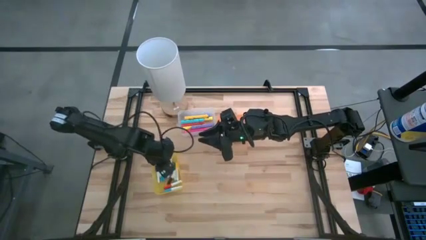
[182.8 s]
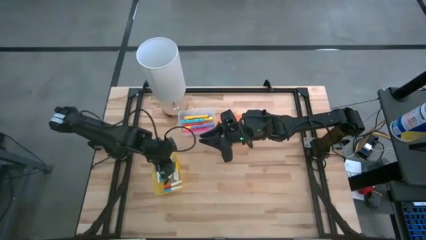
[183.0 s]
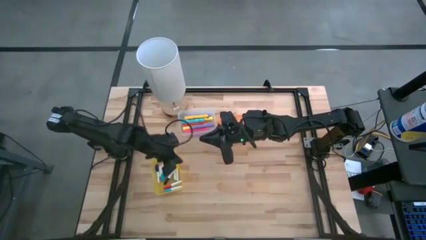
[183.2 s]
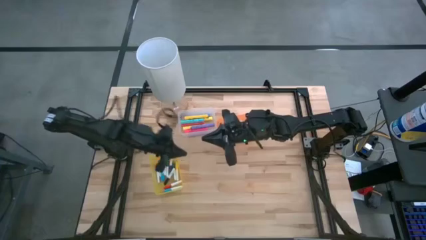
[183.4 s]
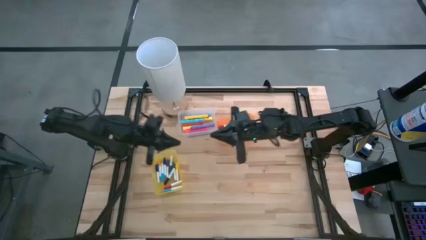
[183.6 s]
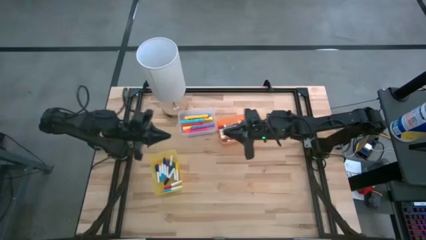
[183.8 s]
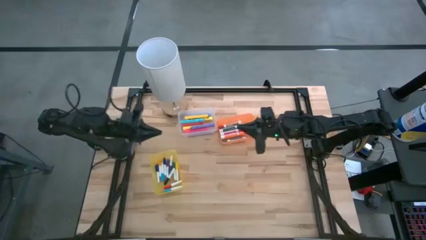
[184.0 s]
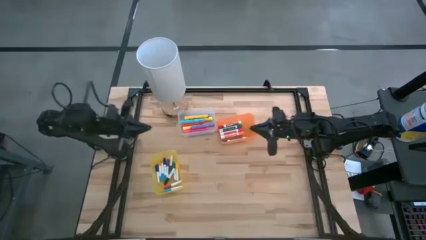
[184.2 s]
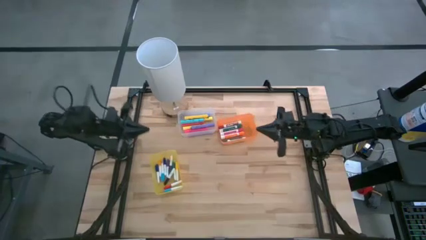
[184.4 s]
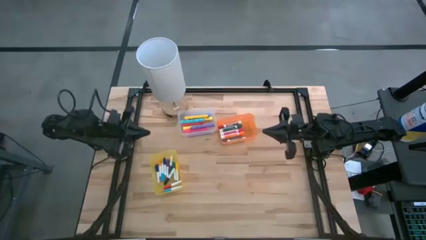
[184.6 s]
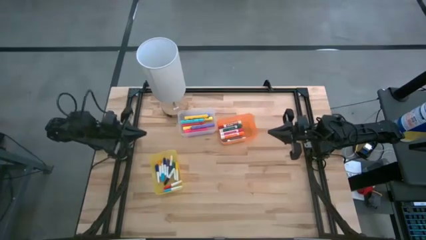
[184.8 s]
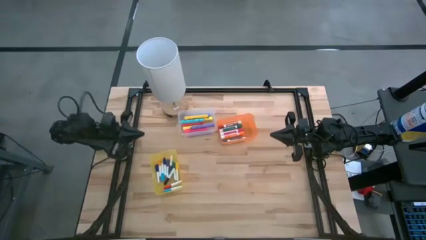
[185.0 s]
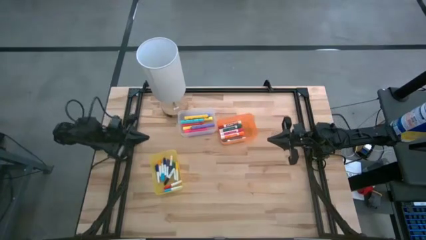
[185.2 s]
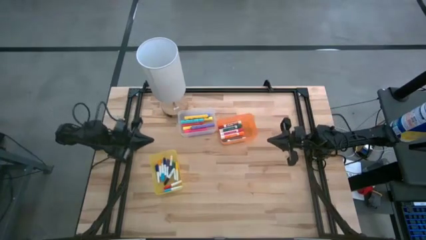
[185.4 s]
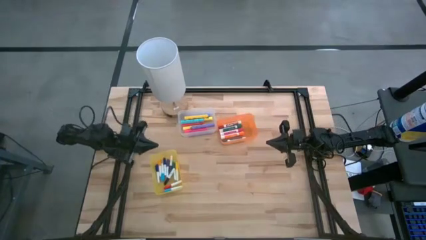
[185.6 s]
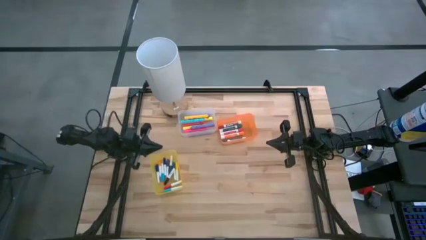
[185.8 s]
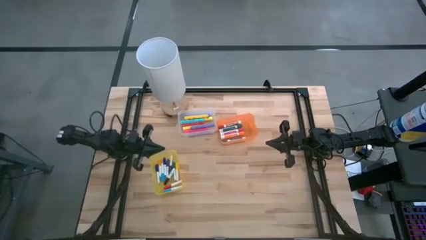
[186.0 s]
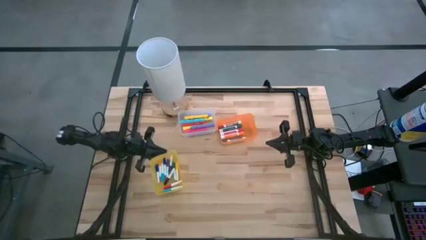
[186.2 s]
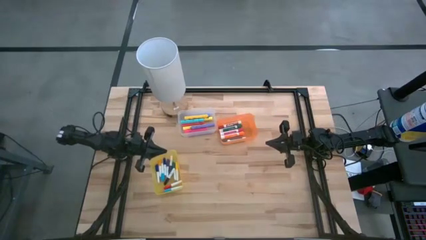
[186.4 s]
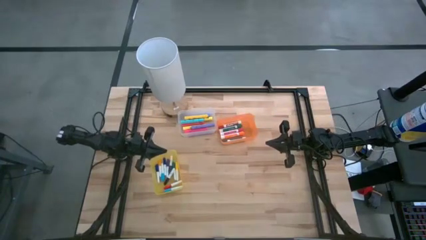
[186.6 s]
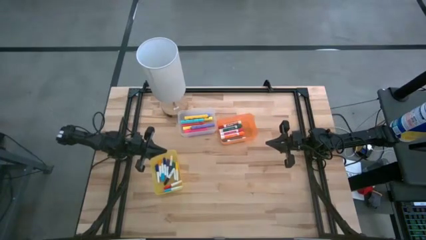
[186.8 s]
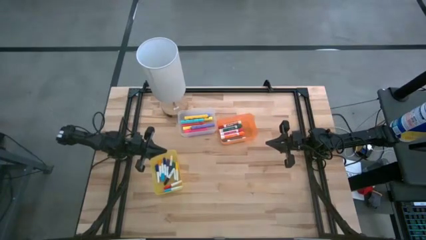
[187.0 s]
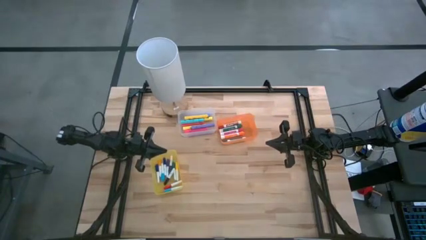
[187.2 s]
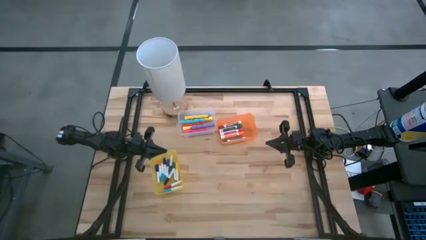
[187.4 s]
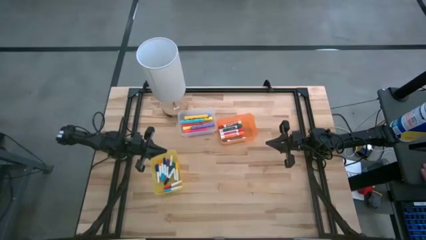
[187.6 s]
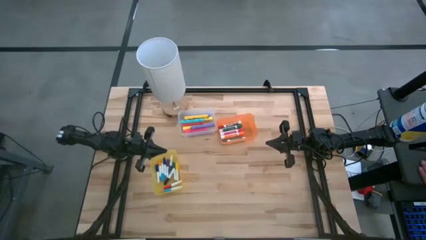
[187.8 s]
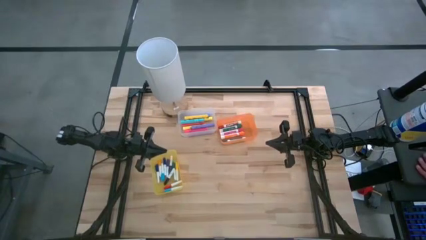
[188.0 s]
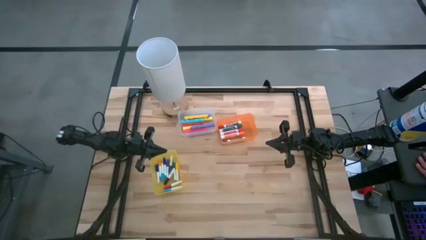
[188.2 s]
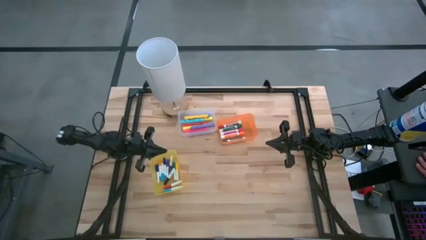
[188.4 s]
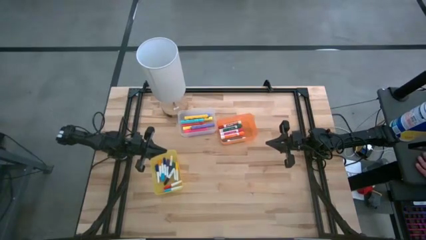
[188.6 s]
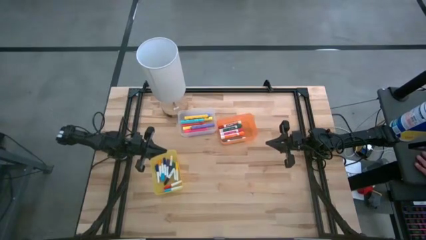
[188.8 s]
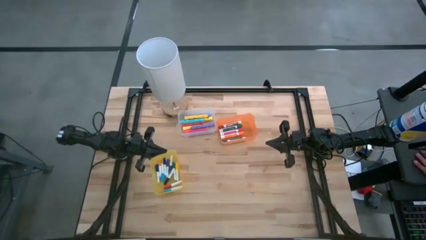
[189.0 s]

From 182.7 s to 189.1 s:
Task: Pick & Place Markers
Return to Home Position

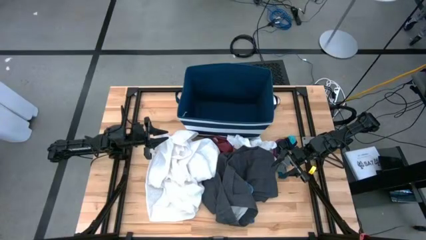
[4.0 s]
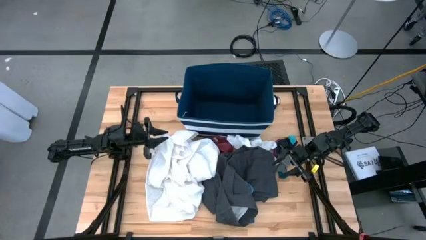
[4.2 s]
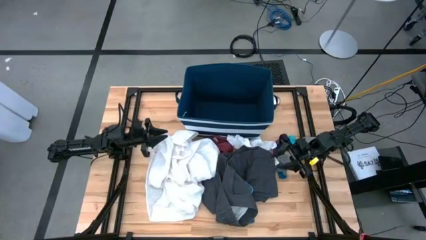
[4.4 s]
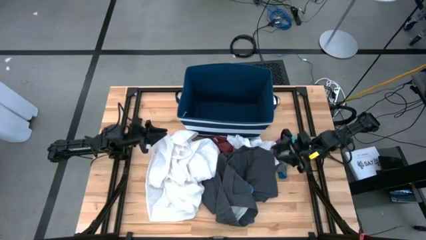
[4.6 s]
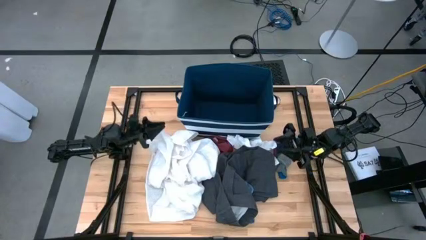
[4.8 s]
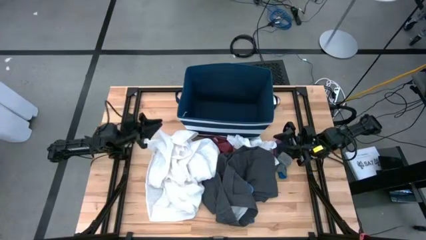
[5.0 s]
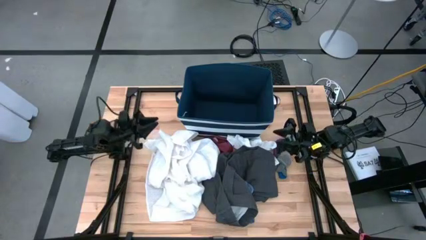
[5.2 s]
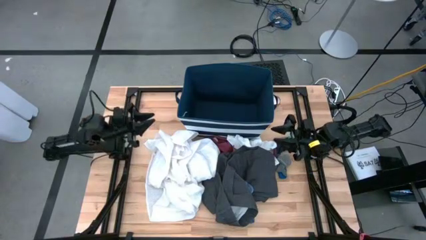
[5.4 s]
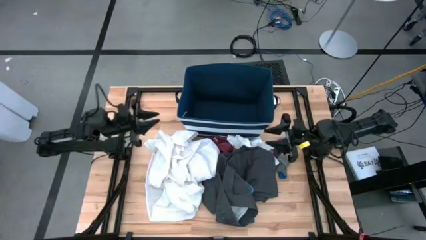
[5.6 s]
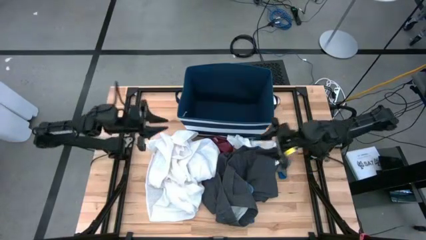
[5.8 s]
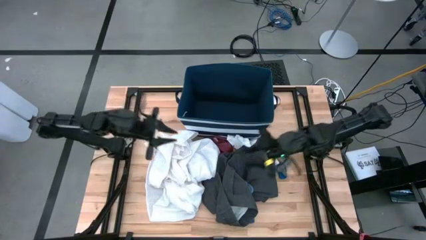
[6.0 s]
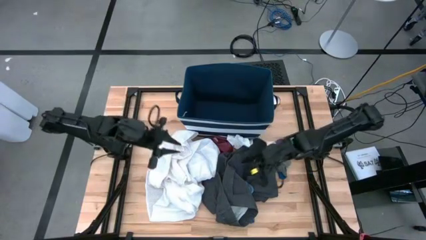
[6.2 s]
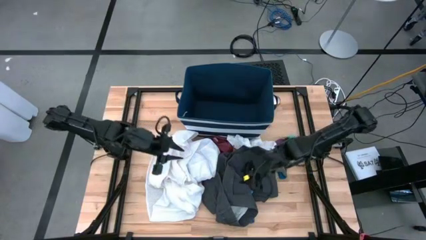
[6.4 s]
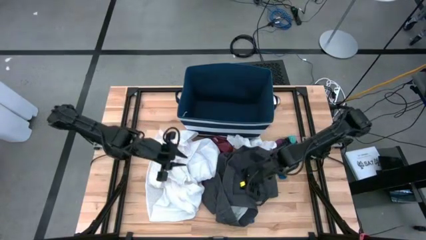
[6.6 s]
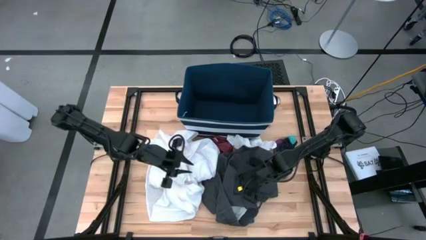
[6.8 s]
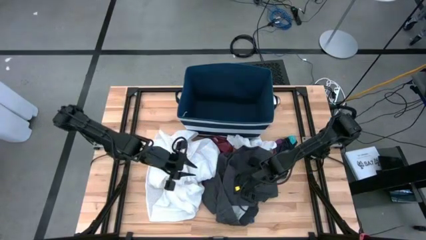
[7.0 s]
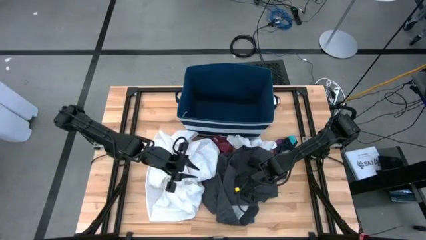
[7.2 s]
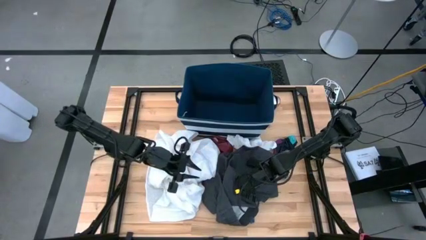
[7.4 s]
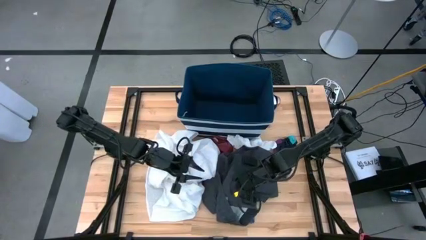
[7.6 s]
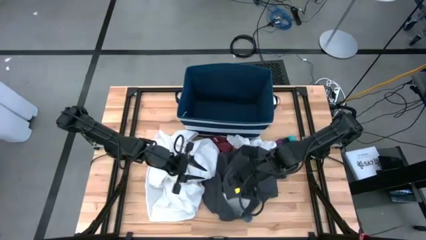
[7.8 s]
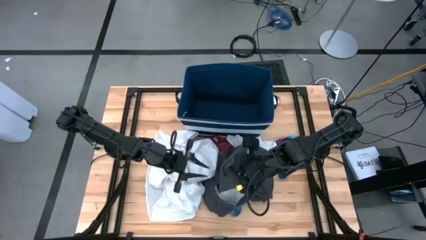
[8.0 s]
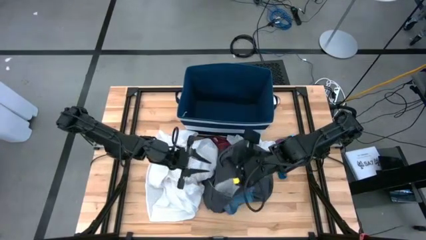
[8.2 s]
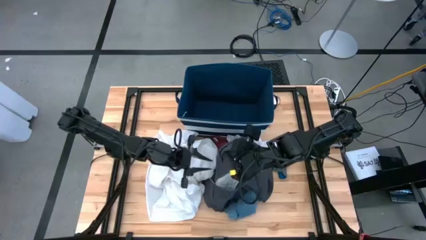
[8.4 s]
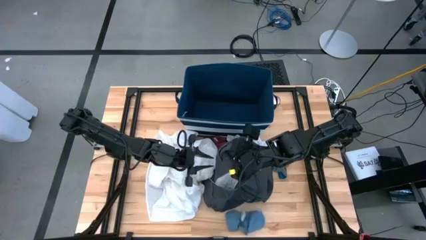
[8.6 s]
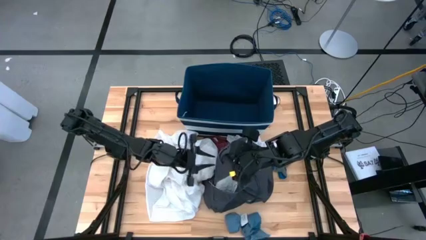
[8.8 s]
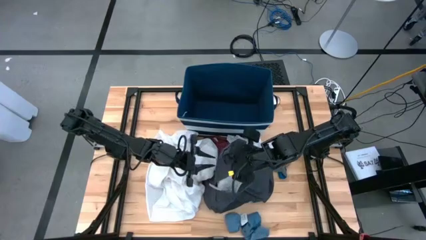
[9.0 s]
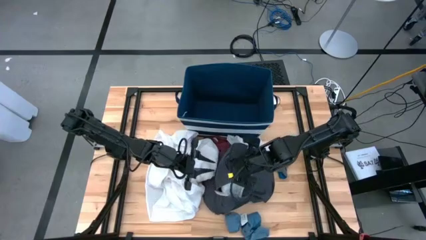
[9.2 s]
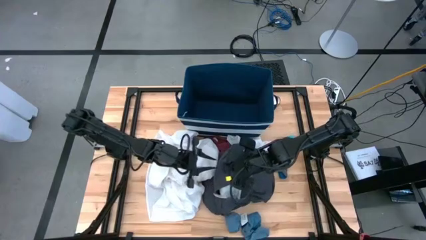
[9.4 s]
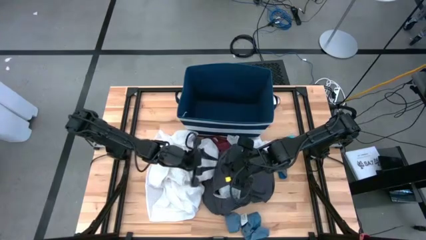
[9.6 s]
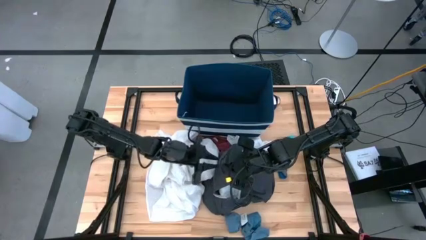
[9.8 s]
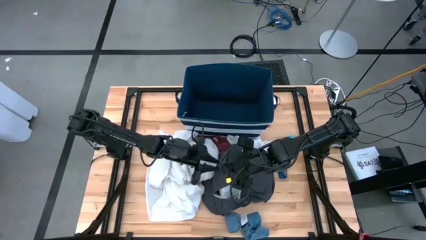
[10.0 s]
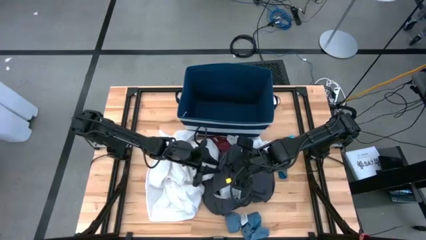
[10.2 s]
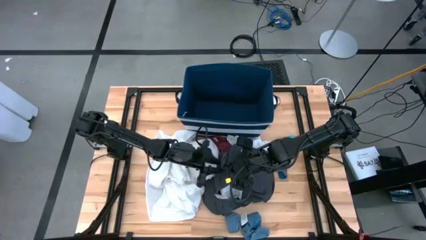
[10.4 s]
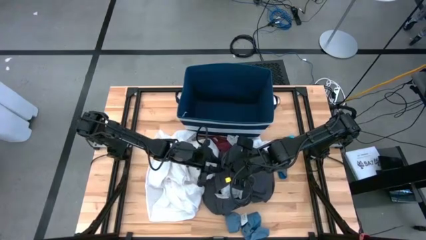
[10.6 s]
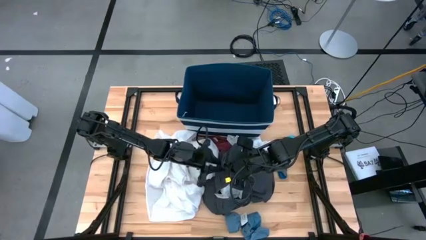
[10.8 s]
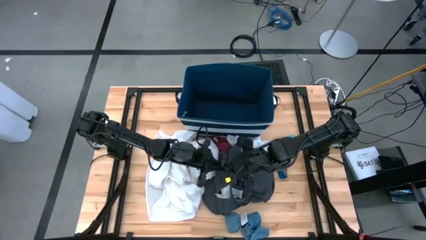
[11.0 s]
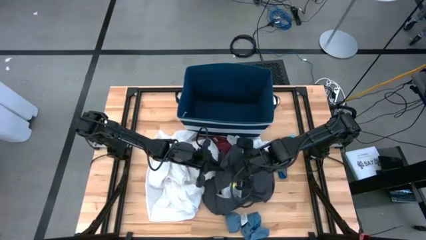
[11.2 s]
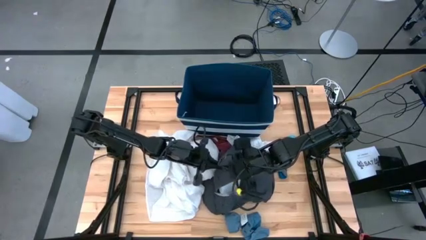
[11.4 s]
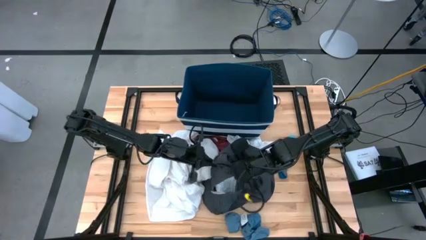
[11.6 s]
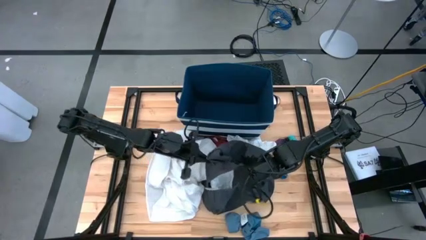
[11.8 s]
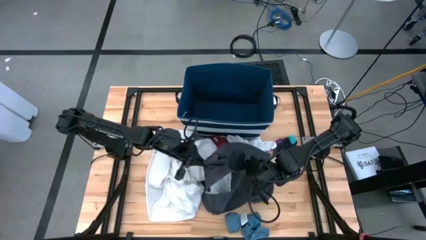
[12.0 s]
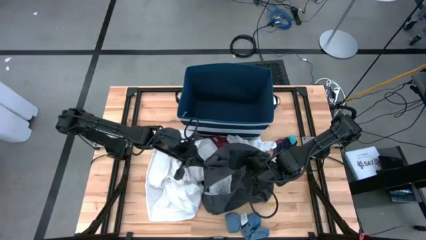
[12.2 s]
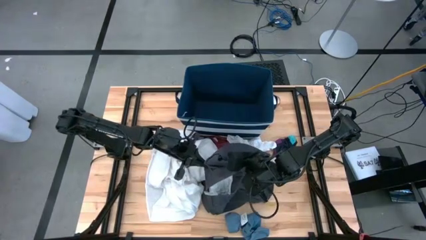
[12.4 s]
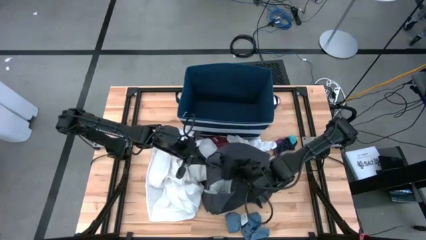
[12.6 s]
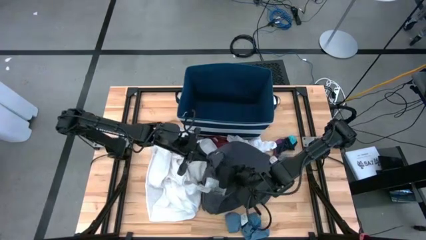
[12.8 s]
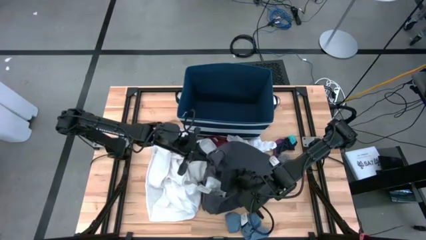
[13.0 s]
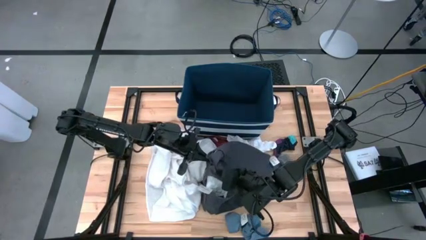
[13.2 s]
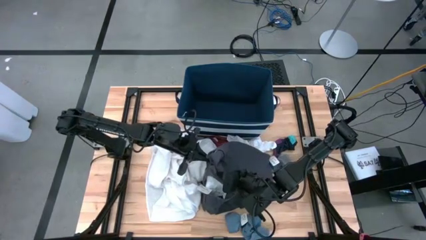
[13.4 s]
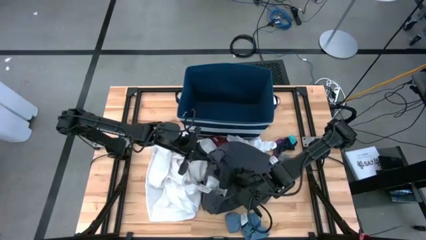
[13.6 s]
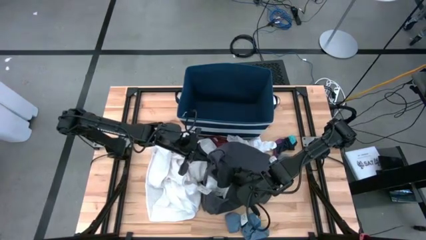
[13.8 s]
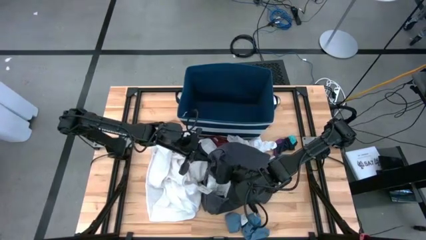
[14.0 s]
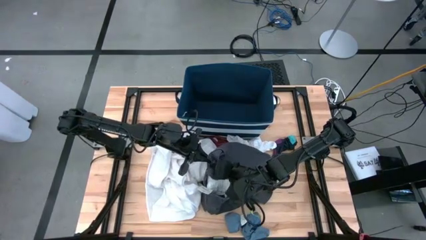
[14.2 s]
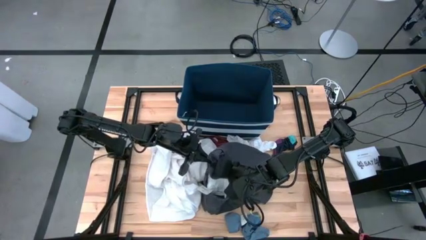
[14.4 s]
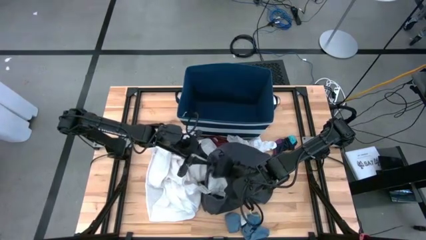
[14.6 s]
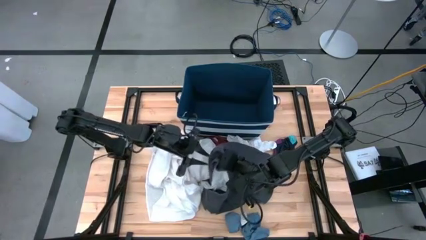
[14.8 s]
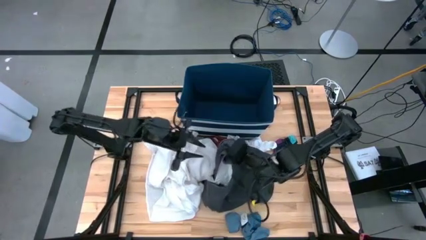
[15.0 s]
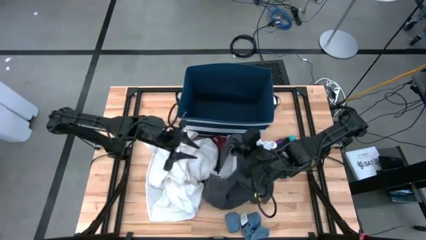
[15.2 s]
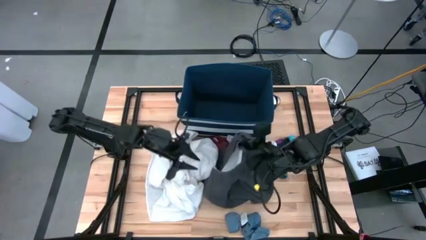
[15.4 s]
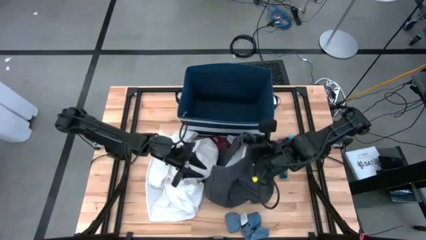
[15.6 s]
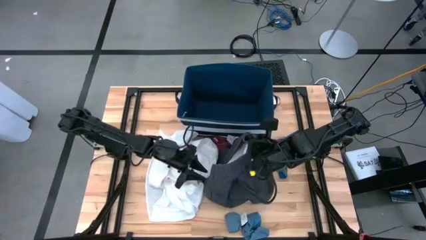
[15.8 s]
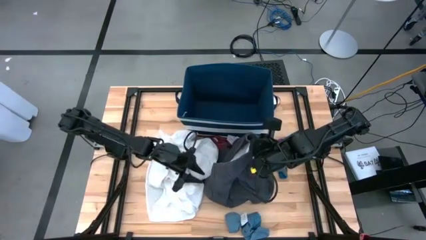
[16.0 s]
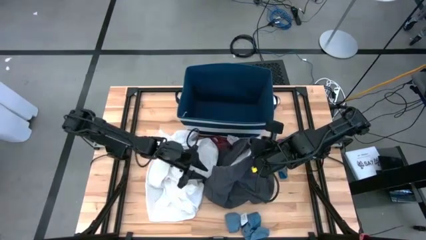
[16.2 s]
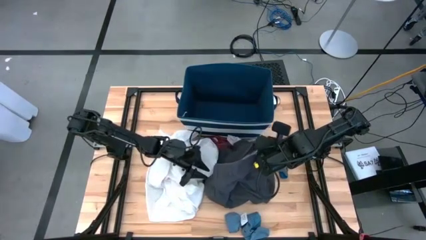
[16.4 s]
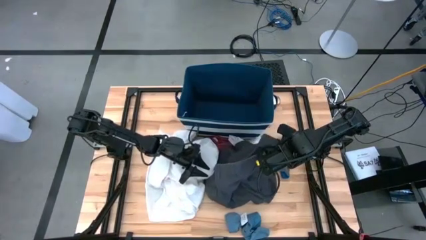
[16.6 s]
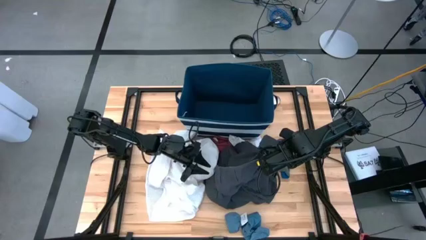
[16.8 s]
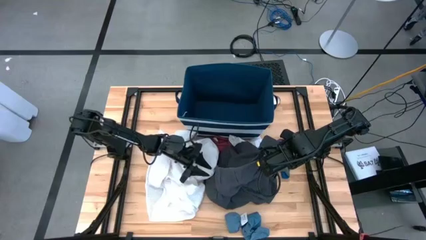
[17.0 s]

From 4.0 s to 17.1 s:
Task: Sort clothes
Put the black shorts into the blue laundry organizer
